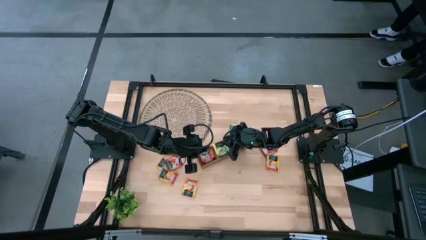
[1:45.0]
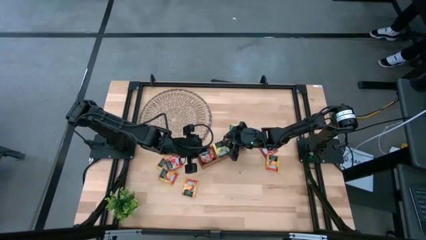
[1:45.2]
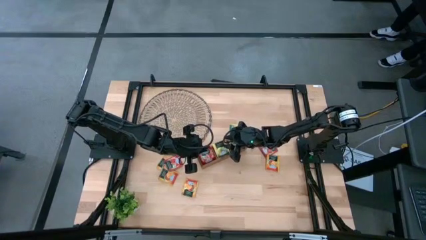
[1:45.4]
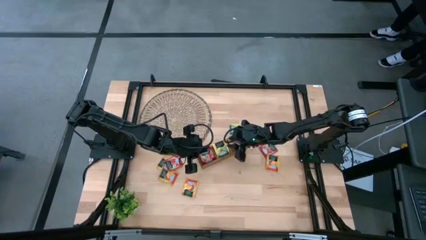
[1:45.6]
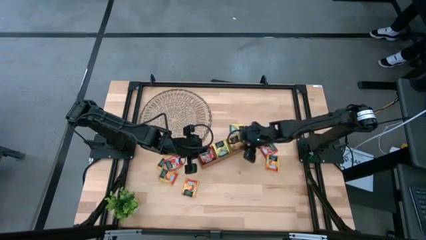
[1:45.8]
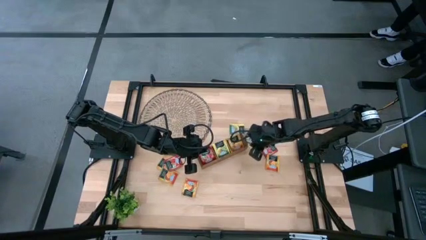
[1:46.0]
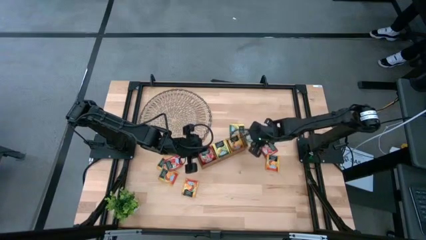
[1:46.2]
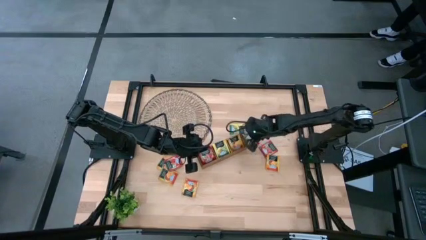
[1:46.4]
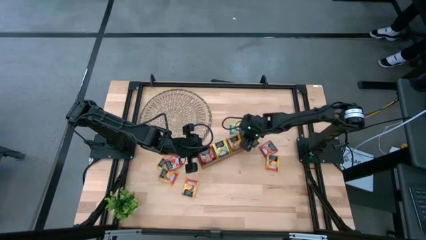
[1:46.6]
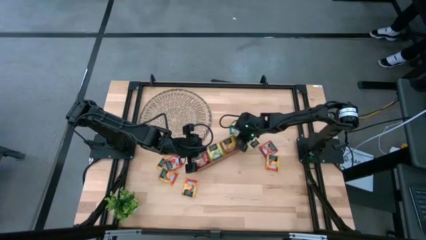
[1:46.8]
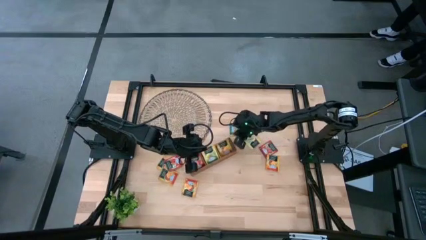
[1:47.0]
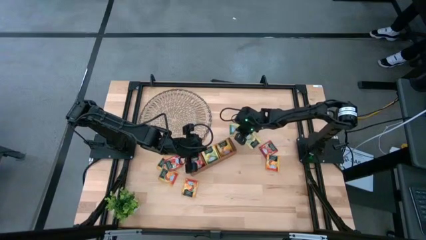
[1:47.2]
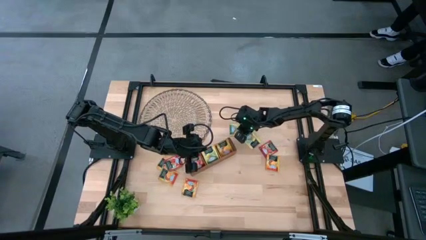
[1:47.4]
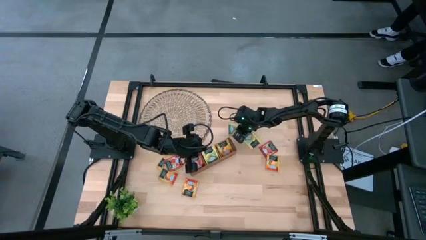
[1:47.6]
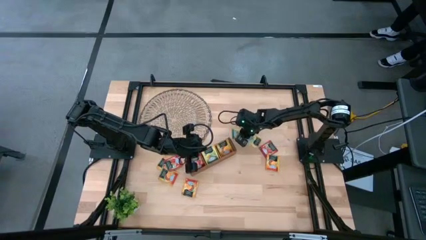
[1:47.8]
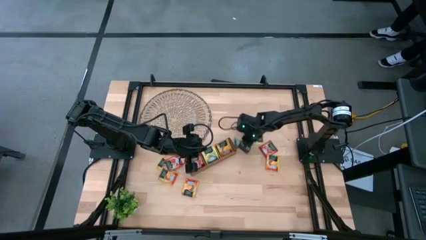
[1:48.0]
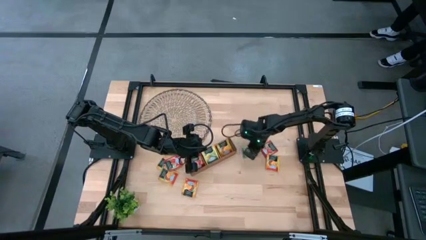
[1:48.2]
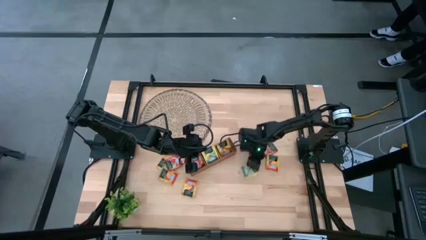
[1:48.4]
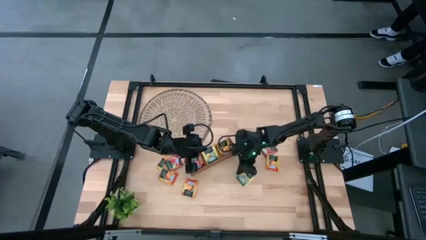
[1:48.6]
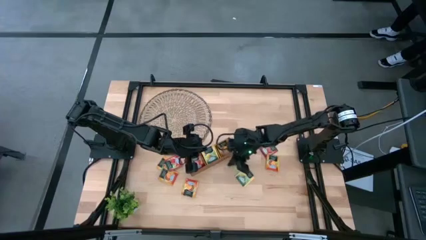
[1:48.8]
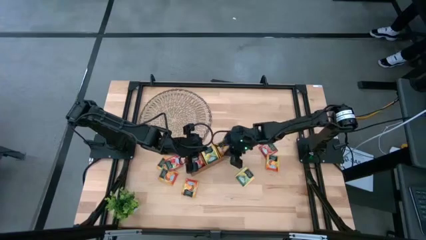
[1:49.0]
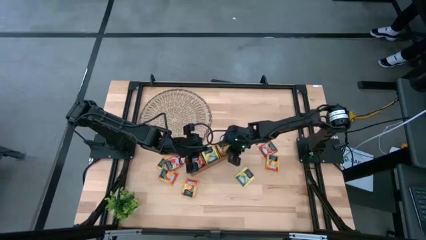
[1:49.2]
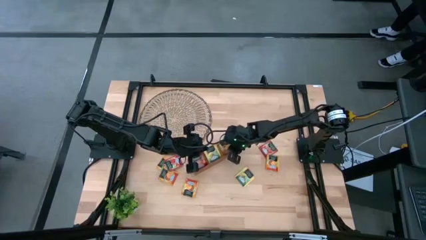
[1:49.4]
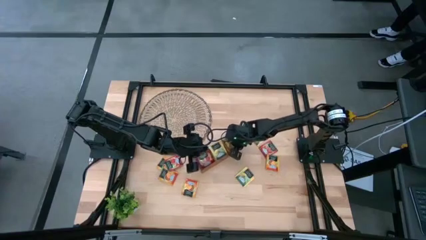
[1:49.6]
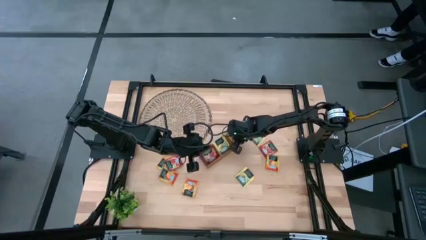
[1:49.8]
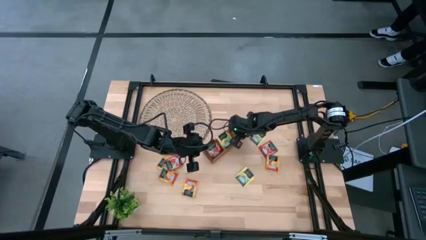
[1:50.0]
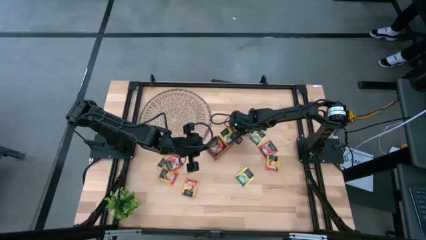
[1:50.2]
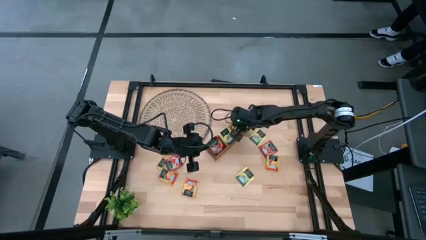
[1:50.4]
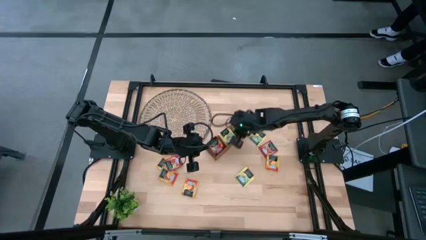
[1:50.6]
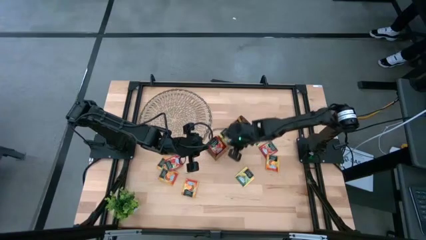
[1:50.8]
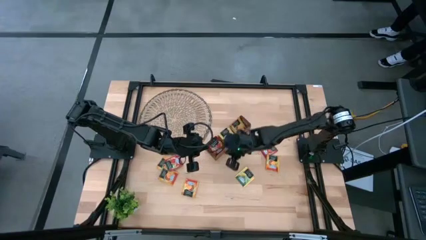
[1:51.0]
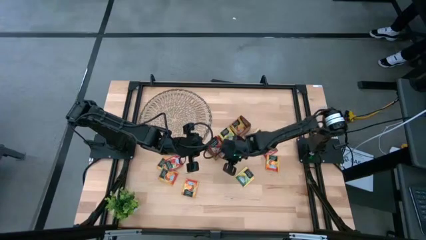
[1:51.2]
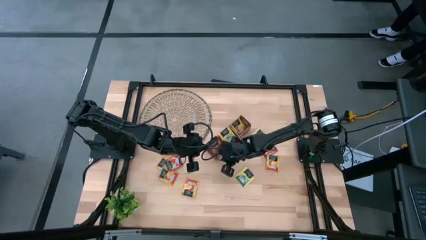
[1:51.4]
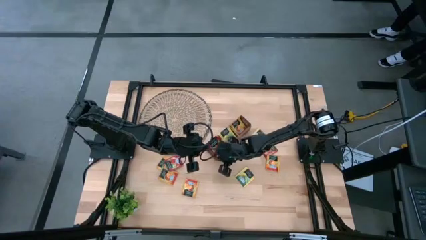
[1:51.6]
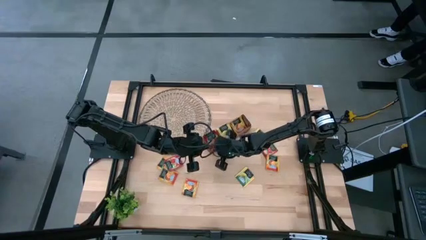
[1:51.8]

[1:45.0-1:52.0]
Task: Pick & Place Tea
Adjust the wooden organizer

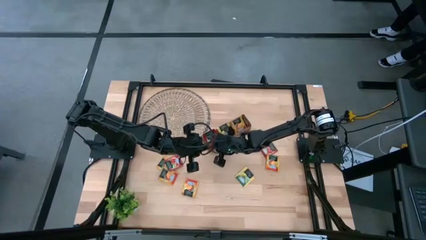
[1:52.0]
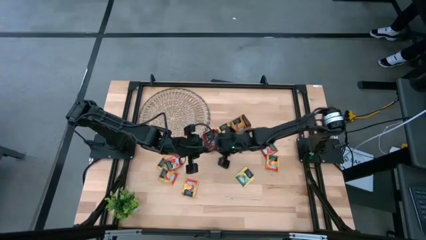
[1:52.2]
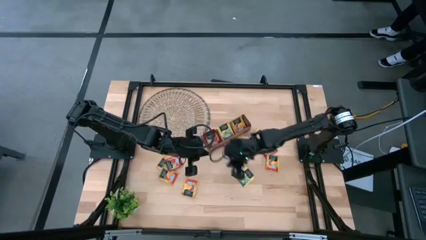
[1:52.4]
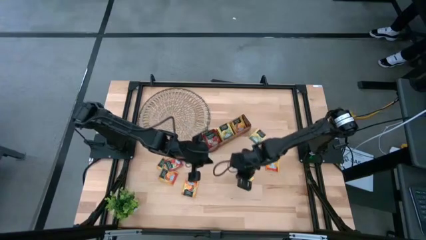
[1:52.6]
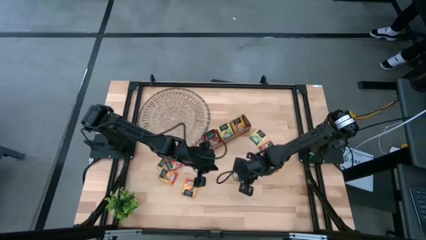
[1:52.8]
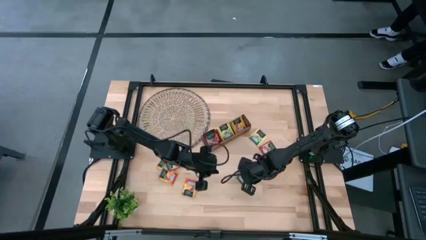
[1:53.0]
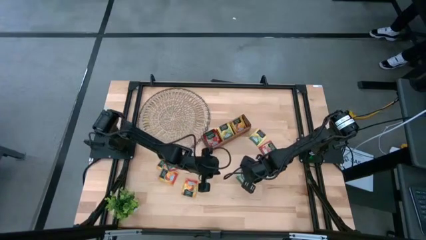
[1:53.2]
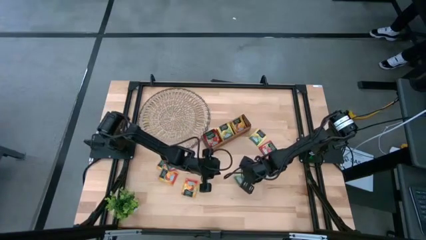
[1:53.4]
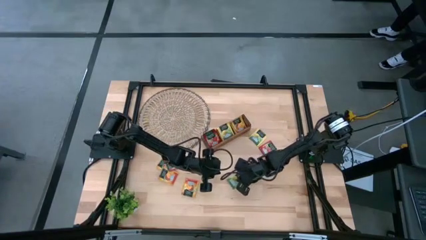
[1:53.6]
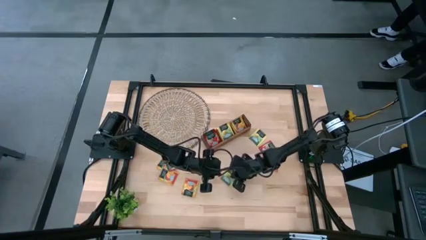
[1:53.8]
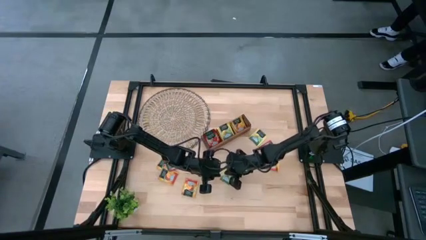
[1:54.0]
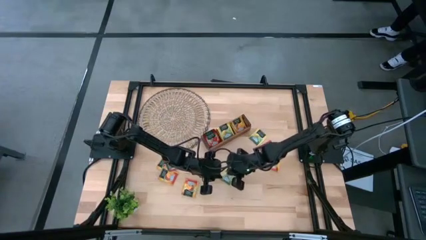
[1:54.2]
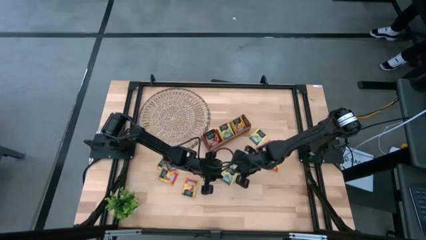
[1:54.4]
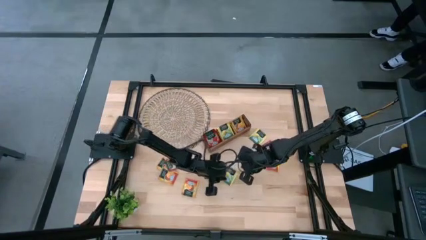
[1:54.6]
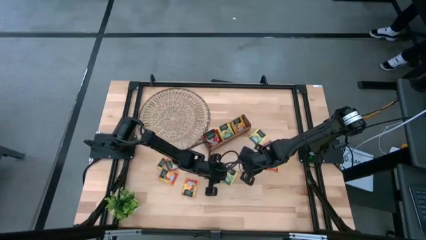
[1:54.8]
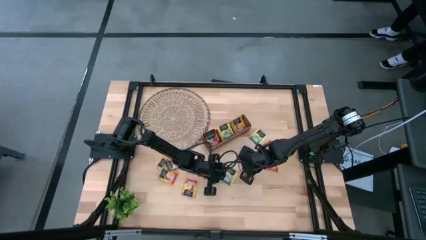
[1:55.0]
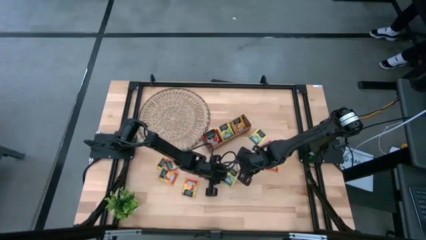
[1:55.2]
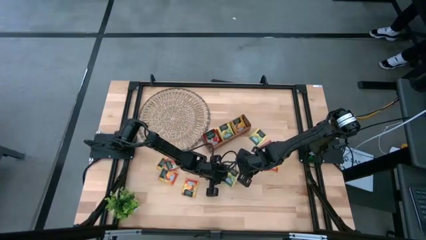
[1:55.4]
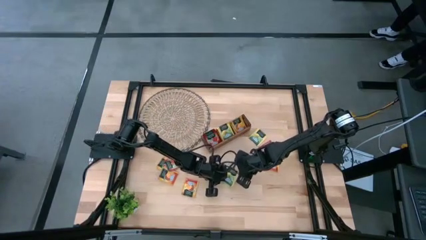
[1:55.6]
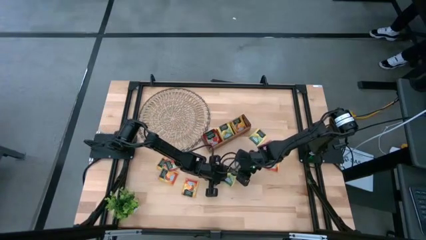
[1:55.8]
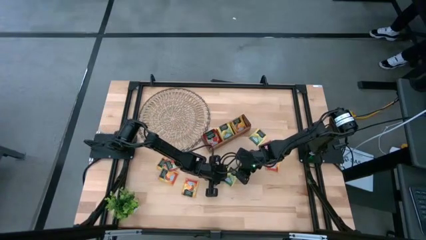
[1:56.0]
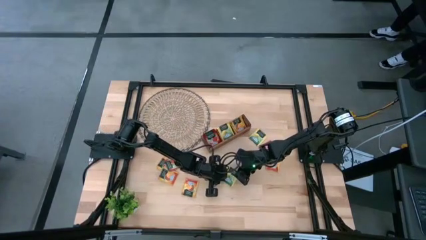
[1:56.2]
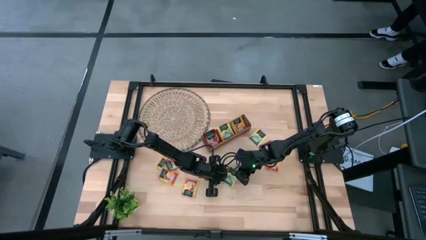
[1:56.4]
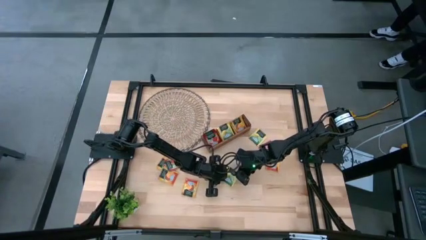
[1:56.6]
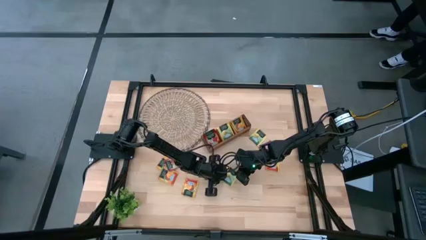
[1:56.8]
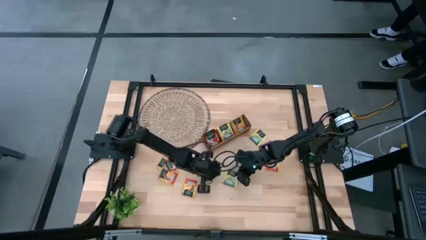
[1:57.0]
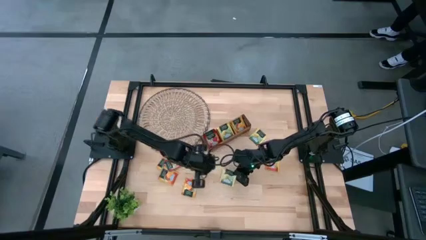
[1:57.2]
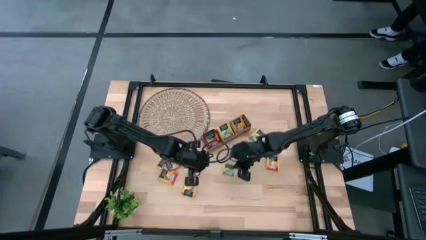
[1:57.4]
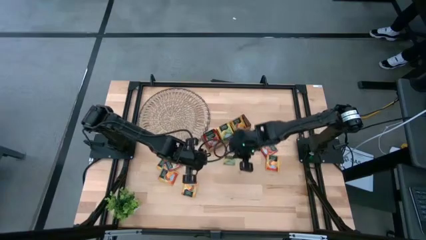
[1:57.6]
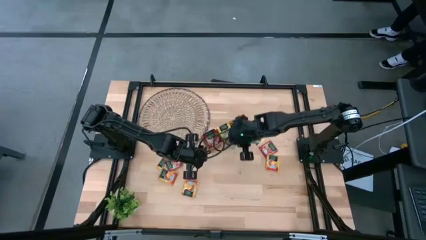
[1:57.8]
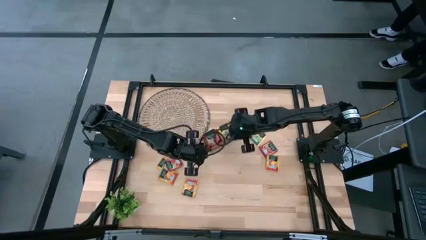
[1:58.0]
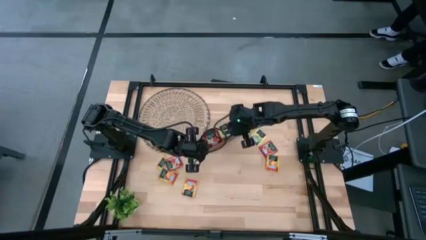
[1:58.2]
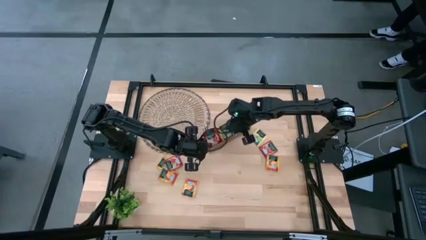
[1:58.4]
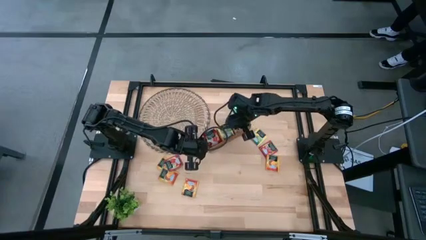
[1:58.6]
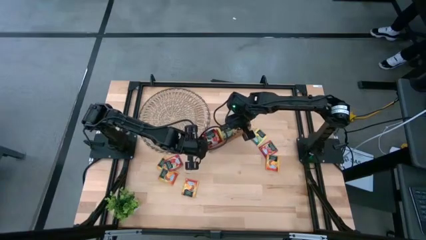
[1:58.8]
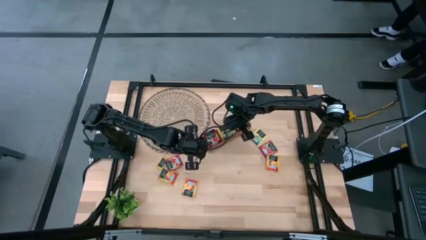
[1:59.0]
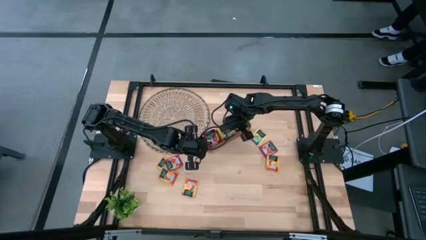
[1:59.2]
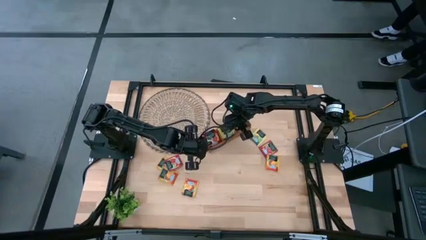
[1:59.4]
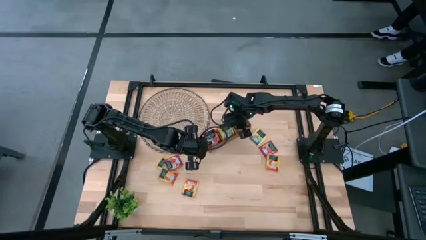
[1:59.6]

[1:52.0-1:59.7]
Put the yellow tea bag into the middle section of the wooden organizer

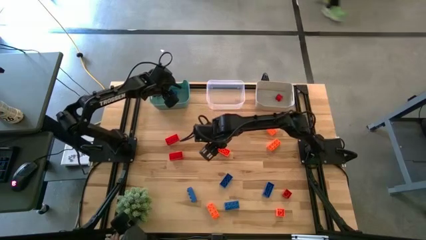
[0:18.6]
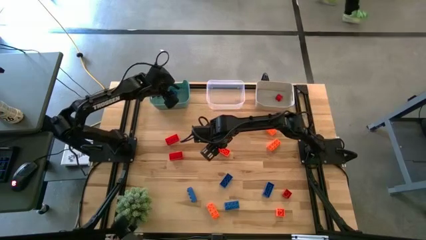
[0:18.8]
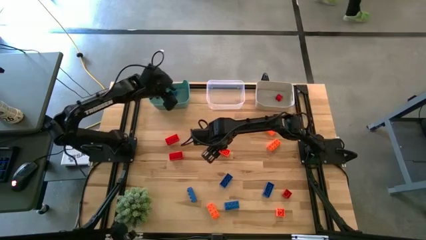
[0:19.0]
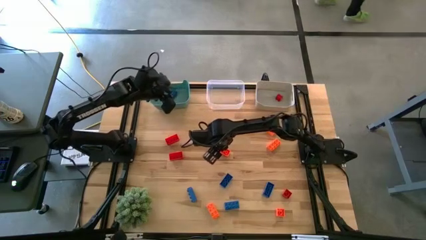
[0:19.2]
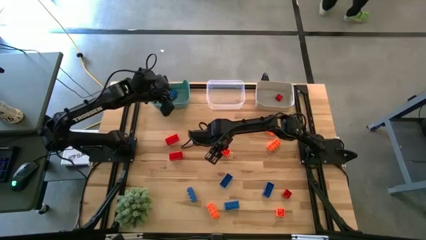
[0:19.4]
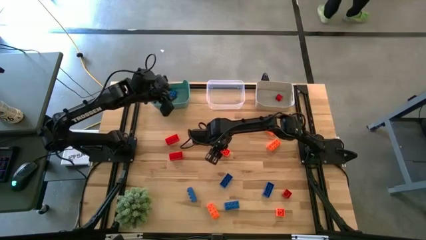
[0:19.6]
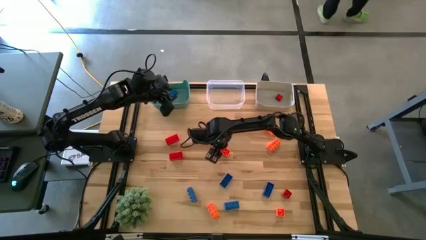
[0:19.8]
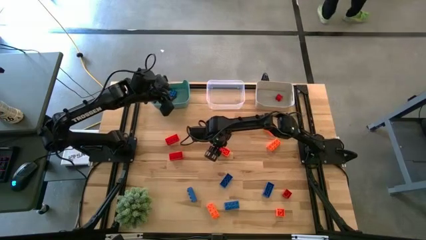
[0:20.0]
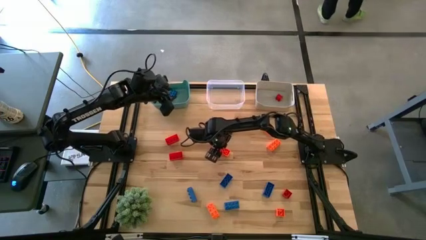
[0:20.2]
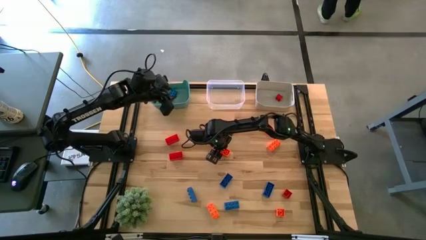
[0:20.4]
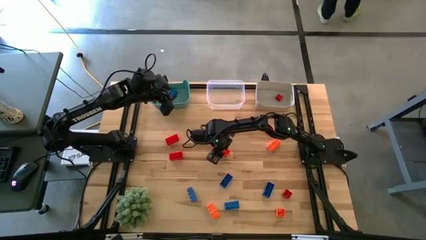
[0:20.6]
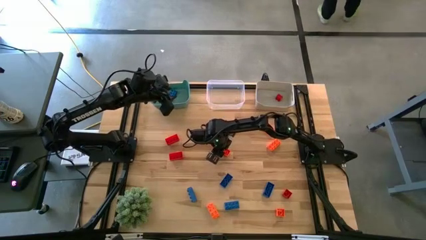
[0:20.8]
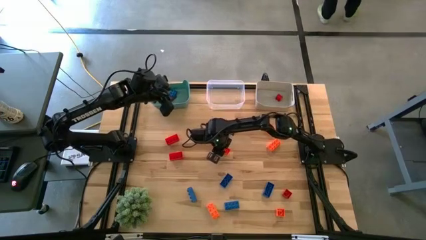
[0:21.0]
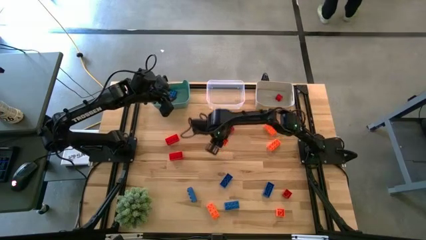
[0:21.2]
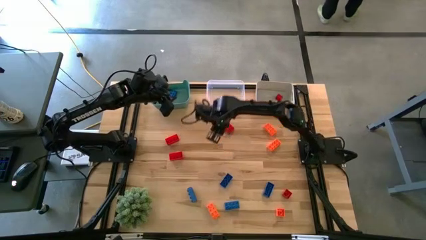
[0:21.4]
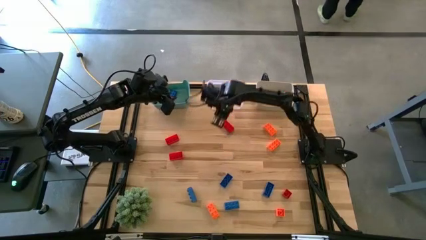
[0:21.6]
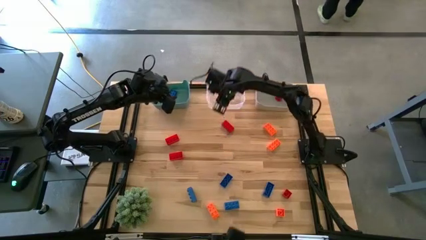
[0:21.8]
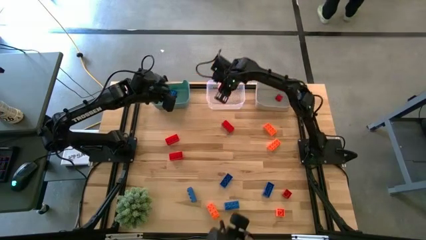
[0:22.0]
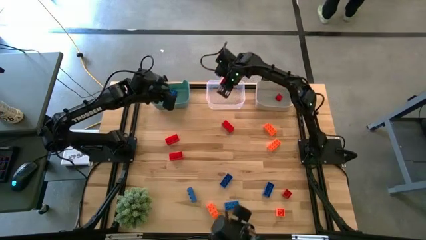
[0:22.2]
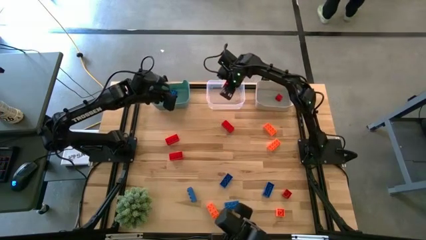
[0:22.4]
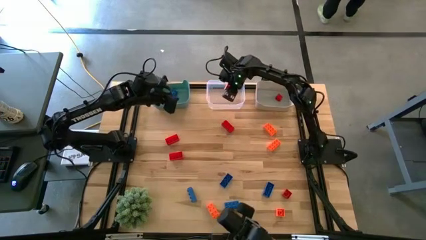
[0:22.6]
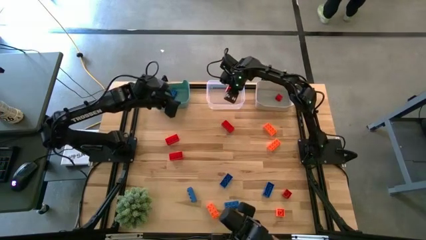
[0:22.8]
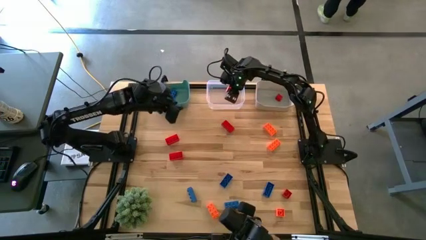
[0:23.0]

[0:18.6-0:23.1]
Task: Sort & place blocks by color
Put the orange game piece into the transparent bin
